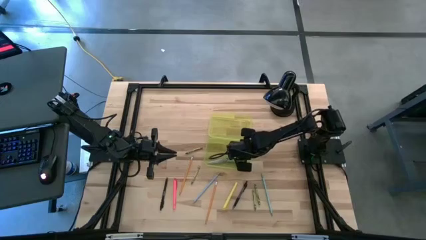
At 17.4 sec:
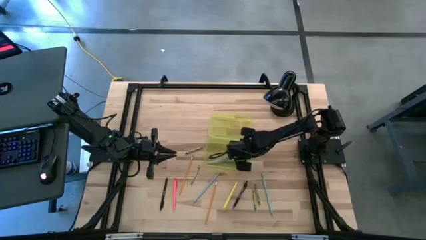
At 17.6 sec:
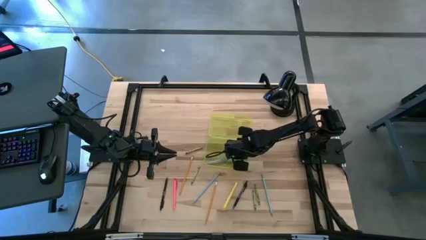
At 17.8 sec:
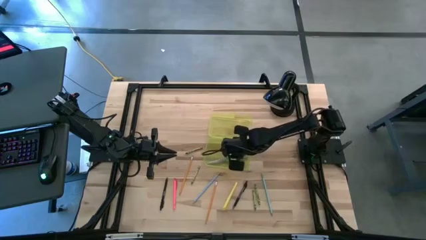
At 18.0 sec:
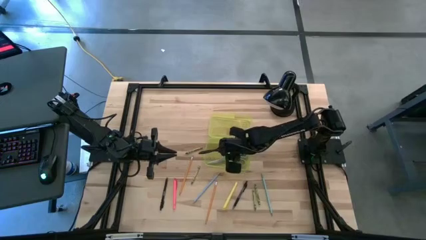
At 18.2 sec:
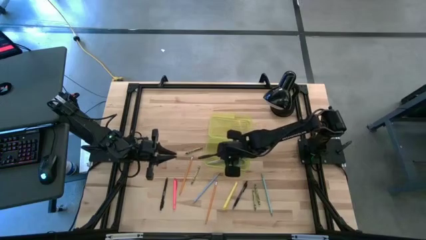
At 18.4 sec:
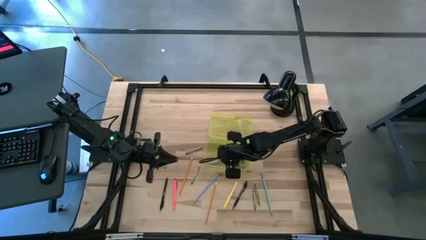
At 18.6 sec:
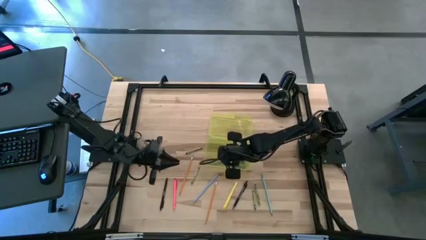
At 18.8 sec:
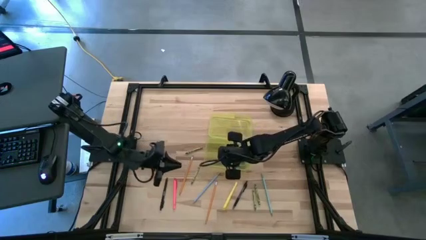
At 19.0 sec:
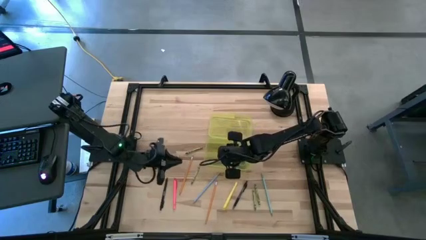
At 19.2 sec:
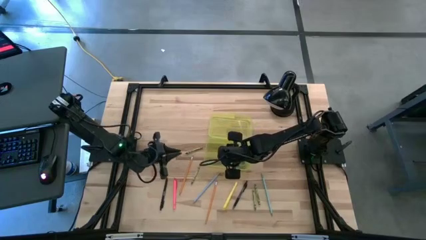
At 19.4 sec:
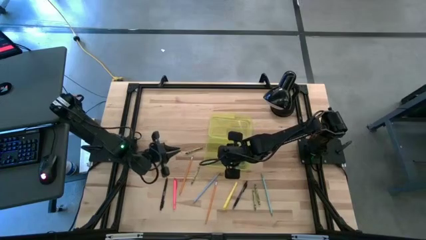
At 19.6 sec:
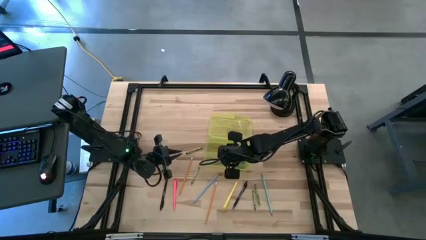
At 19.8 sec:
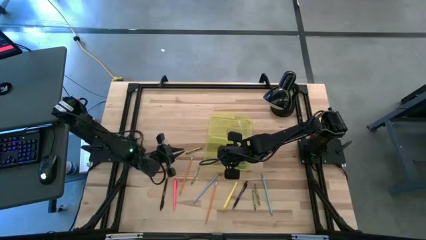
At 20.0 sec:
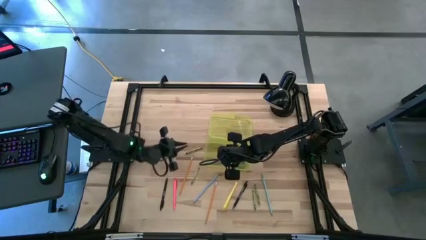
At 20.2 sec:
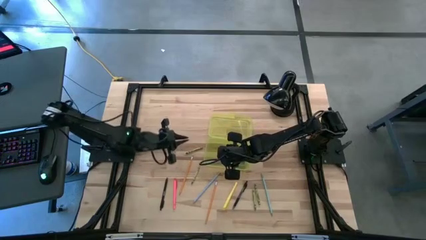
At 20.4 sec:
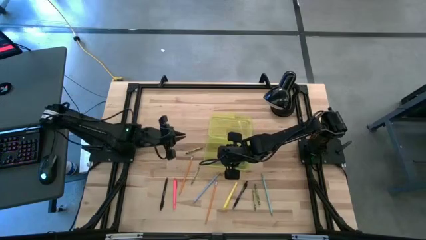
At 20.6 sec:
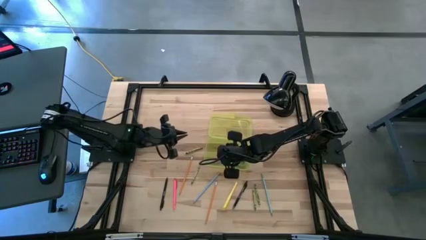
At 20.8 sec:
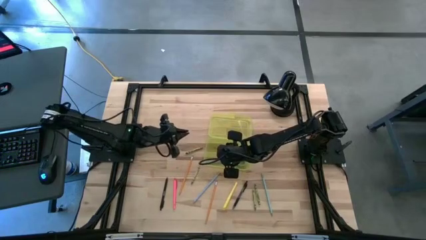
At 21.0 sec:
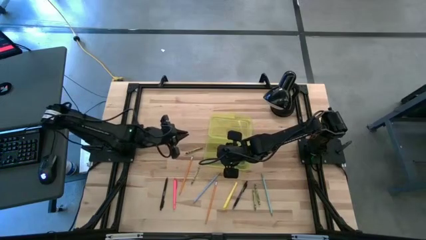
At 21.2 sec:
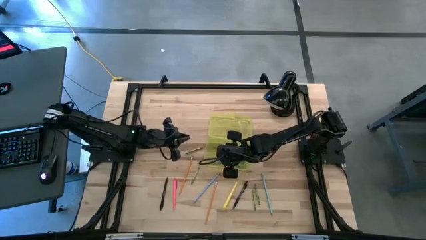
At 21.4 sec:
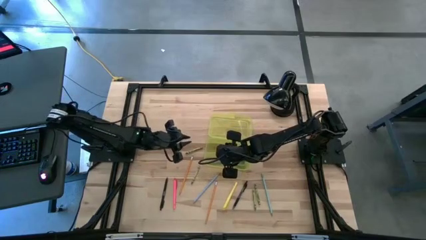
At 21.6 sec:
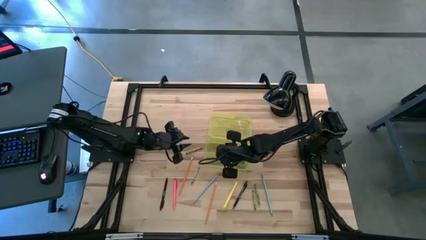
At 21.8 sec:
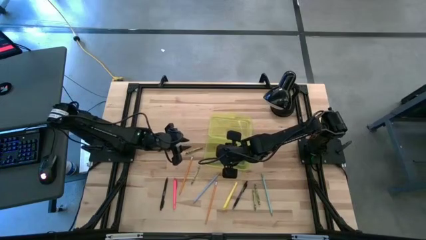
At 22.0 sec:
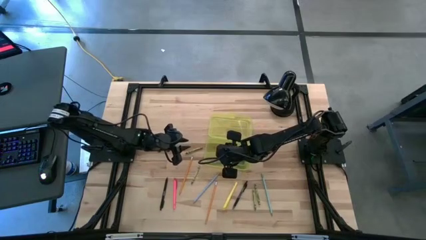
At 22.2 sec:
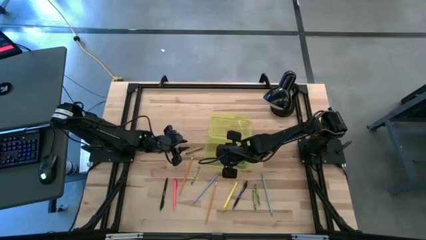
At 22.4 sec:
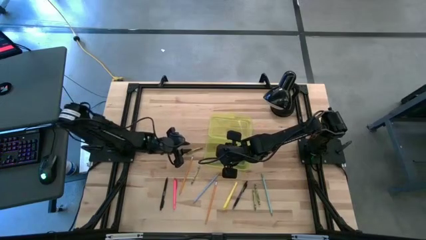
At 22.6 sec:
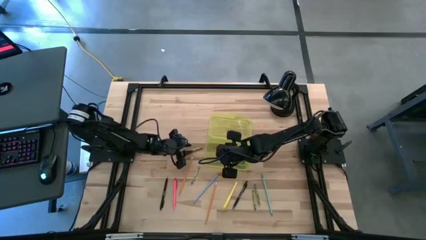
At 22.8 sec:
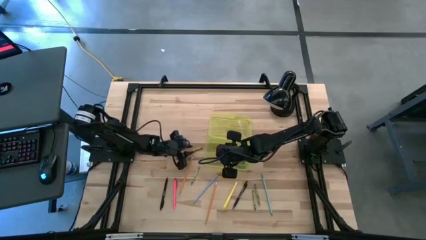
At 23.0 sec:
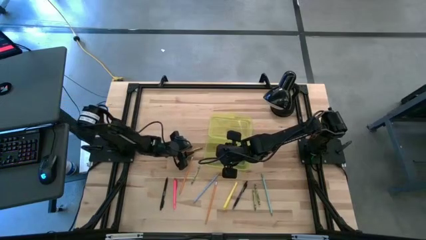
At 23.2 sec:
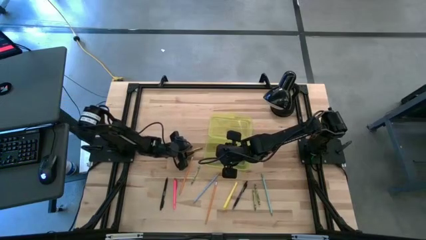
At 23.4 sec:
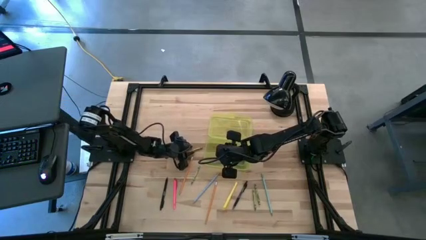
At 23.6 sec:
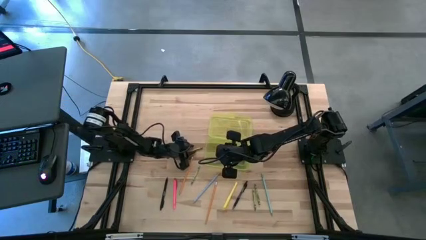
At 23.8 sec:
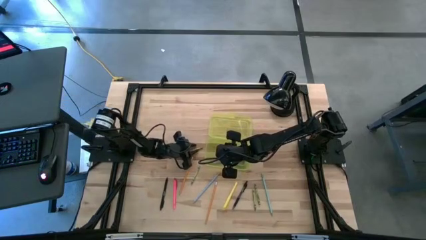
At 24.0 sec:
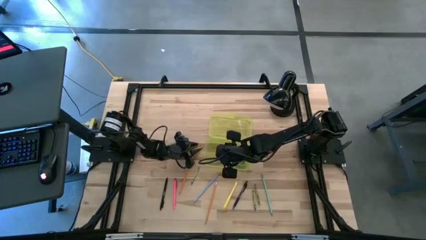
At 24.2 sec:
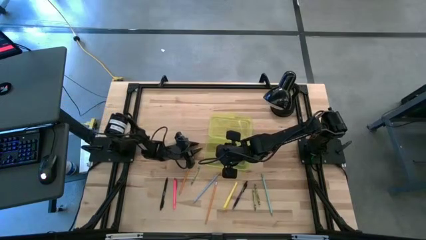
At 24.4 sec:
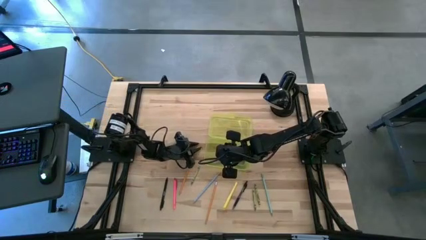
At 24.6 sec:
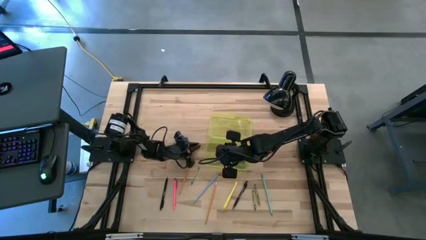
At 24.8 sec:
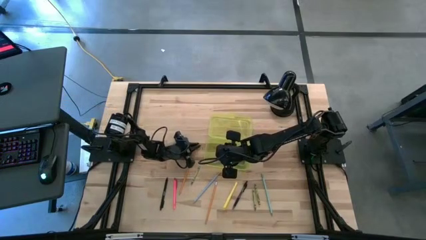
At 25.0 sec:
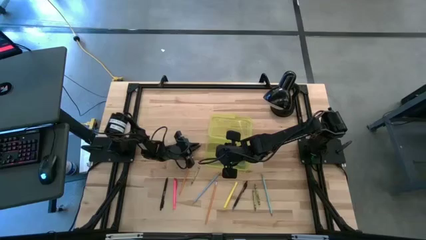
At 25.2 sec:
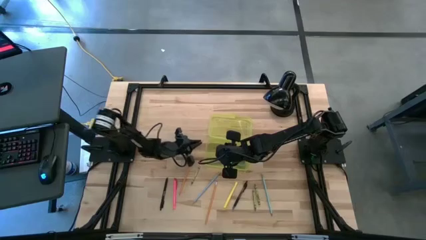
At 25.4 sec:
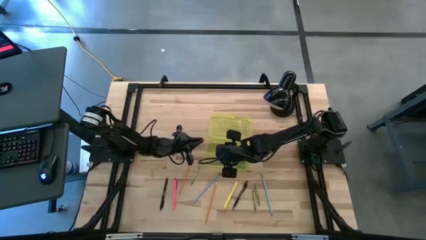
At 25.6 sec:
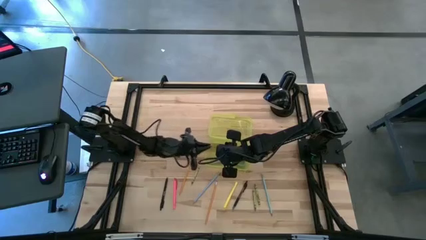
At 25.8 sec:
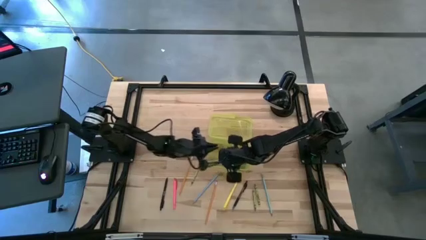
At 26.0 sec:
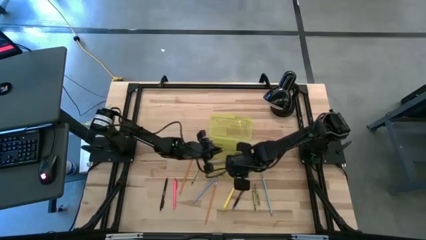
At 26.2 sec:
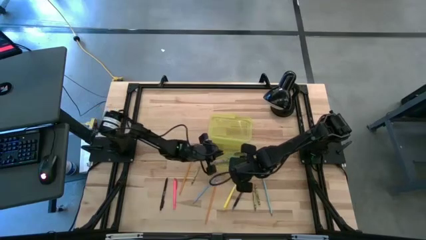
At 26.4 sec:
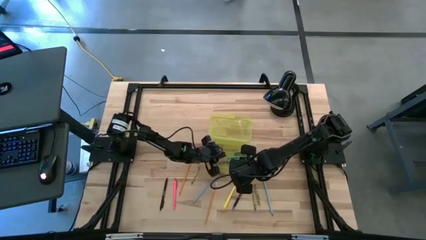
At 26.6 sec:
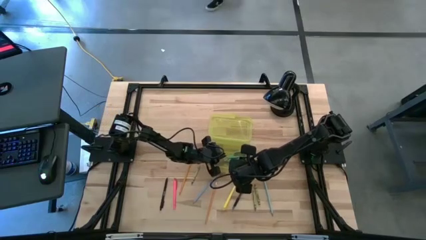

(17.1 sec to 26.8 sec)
Task: Pick & place school supplies into a supply box
Put the green crayon into the yellow supply box

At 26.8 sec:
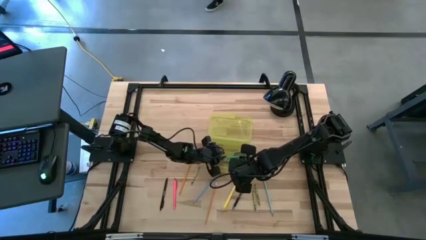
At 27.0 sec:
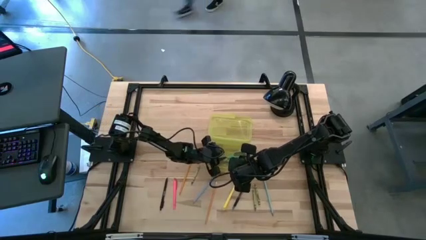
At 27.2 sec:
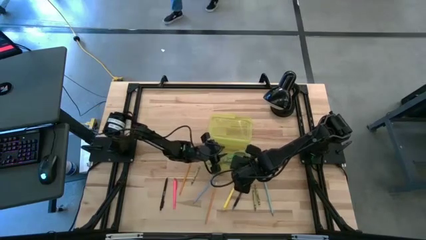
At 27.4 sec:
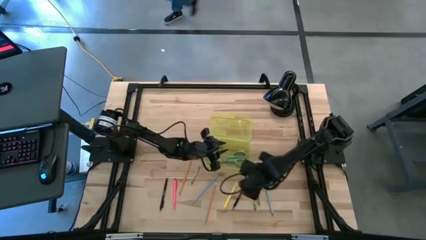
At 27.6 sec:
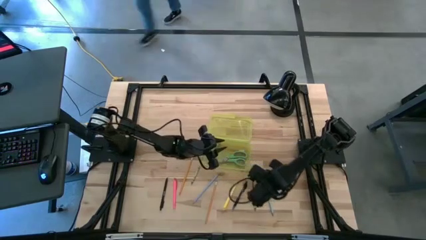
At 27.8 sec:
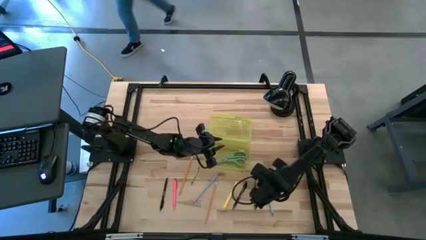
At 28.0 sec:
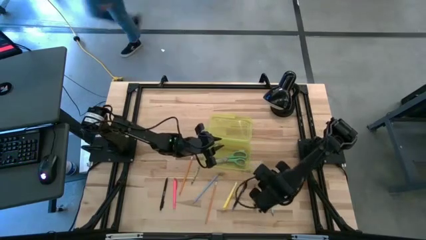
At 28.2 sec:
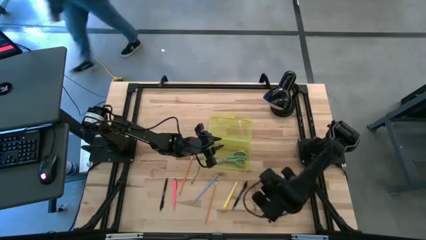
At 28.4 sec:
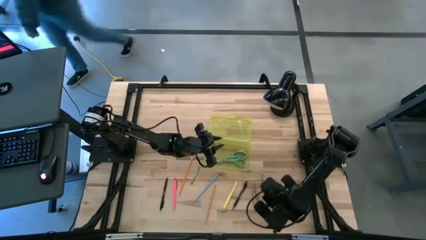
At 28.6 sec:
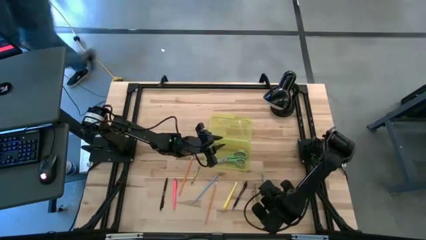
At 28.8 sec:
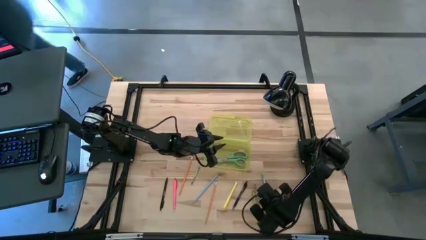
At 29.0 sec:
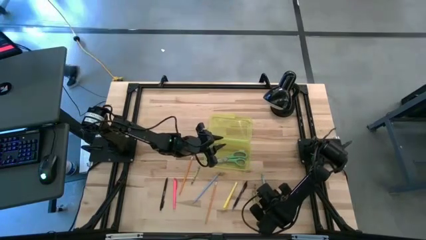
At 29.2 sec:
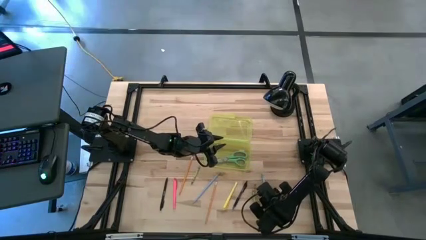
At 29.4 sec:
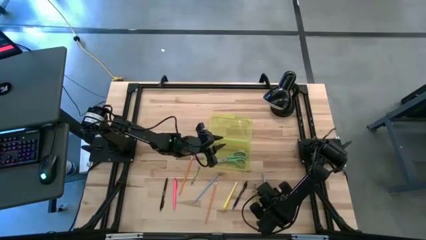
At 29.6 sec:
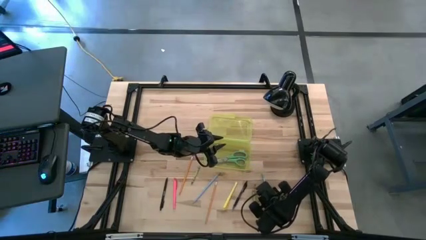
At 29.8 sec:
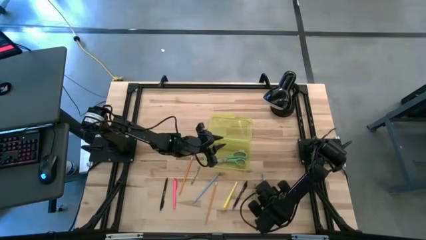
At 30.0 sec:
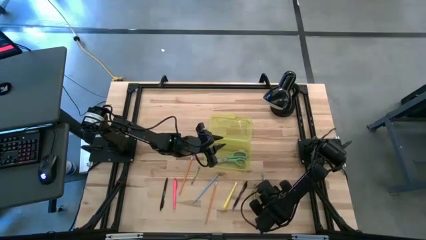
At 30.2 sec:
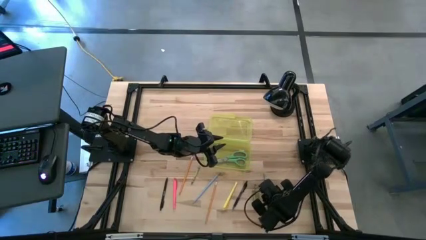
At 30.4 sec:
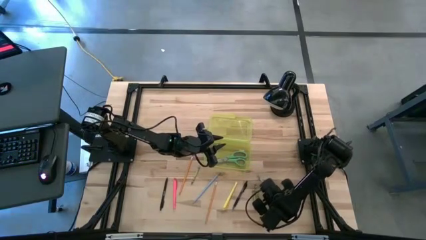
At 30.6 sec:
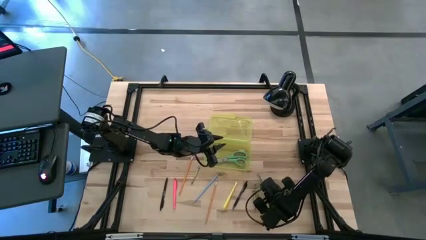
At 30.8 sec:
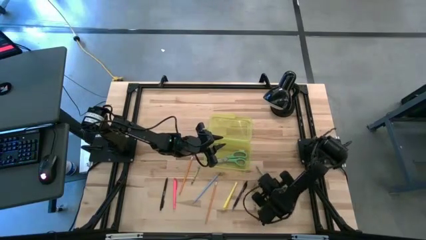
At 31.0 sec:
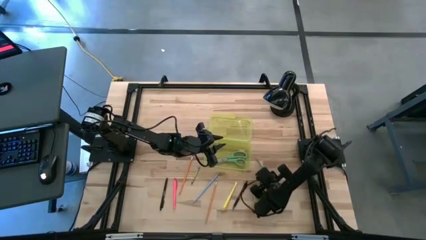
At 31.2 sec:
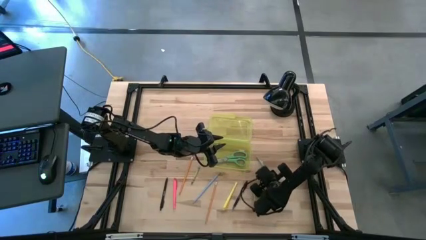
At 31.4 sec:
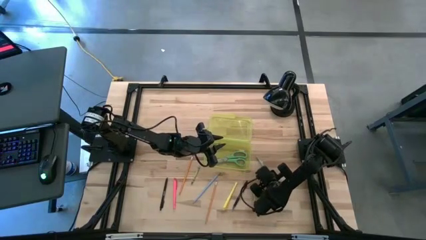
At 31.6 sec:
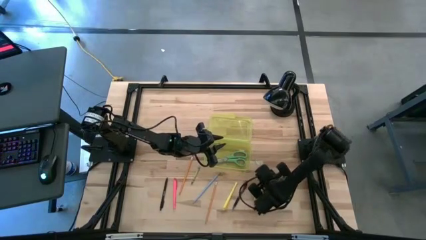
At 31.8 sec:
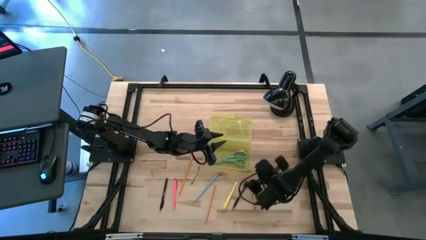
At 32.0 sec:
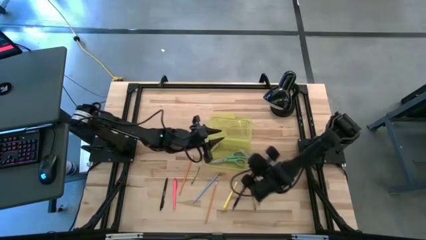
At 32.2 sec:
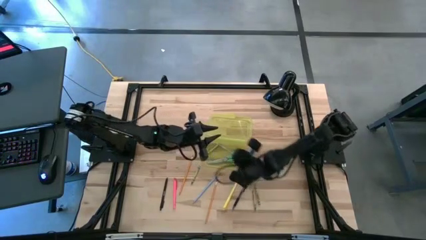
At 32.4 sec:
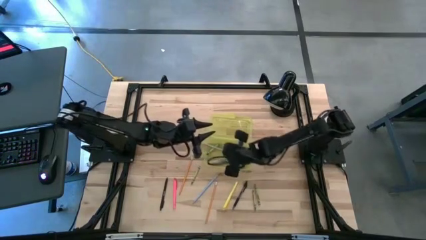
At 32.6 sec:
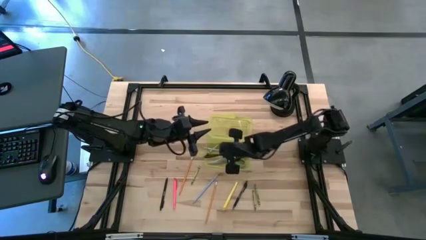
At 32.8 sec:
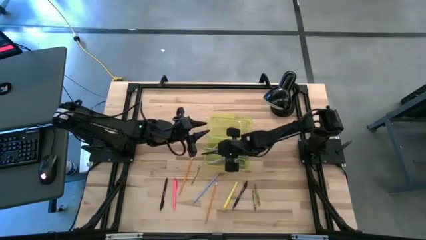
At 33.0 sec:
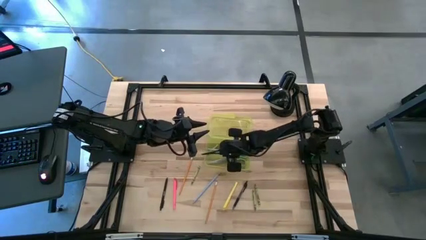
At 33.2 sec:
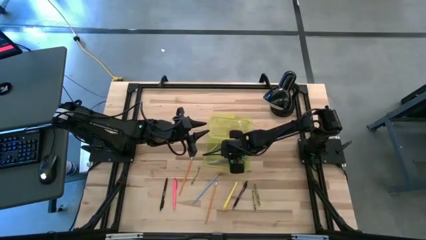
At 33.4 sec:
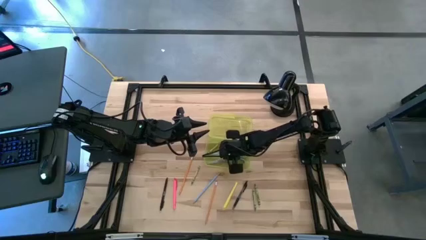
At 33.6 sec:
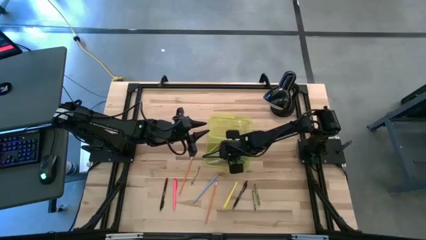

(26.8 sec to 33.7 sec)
Put the blue pencil into the yellow supply box
